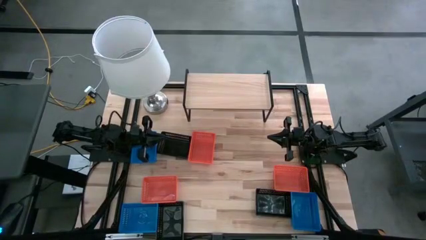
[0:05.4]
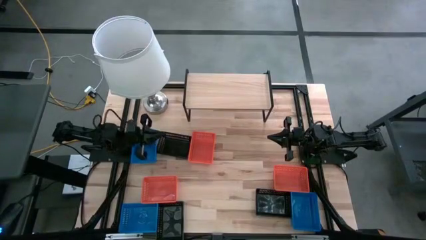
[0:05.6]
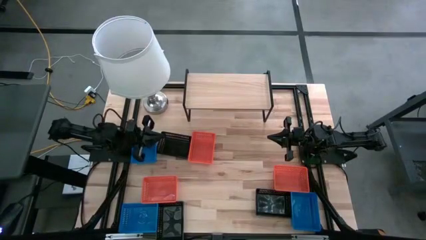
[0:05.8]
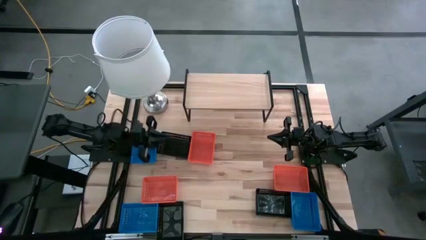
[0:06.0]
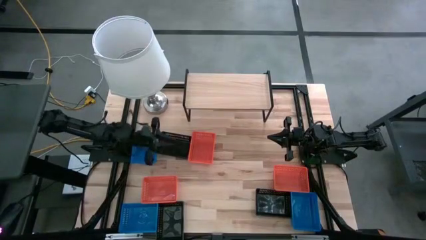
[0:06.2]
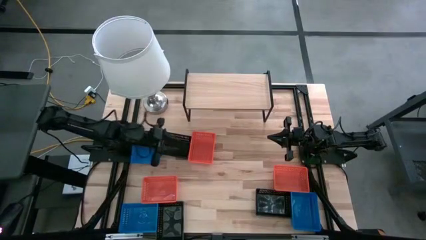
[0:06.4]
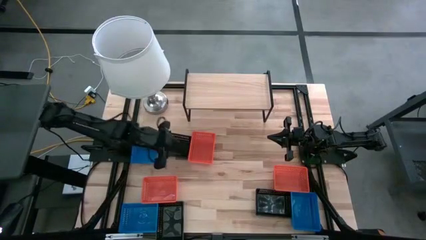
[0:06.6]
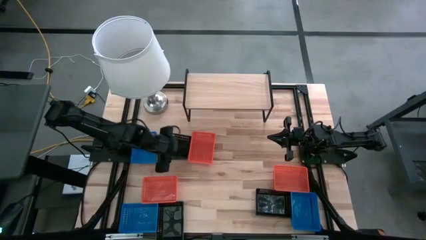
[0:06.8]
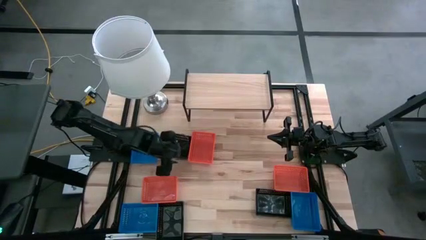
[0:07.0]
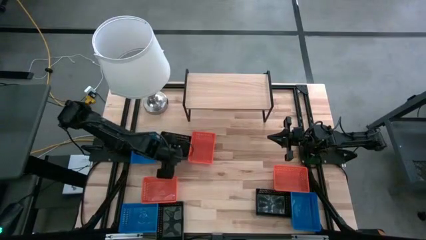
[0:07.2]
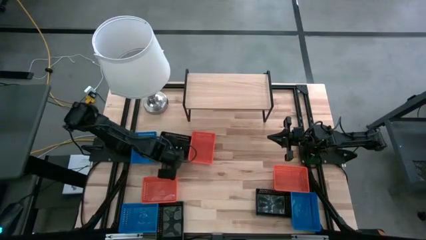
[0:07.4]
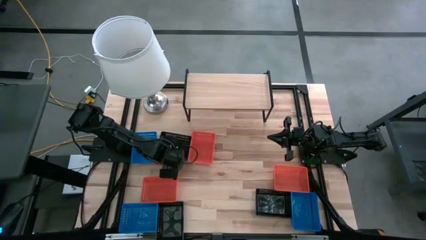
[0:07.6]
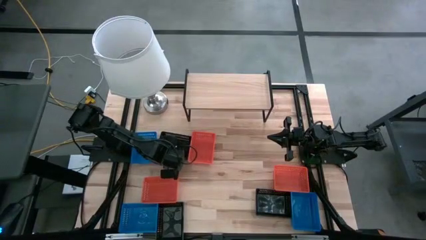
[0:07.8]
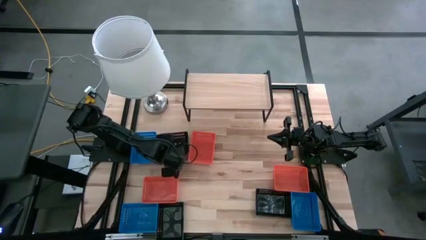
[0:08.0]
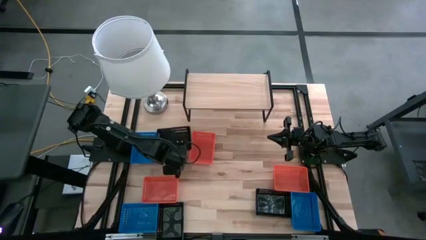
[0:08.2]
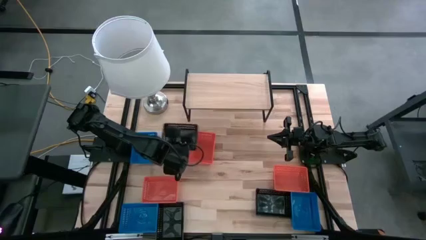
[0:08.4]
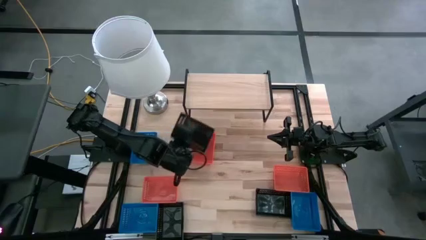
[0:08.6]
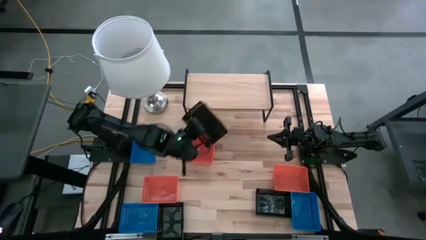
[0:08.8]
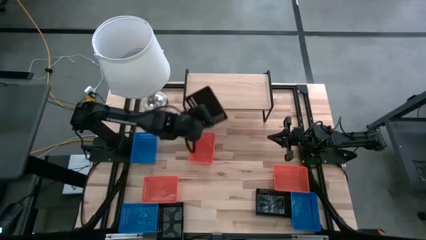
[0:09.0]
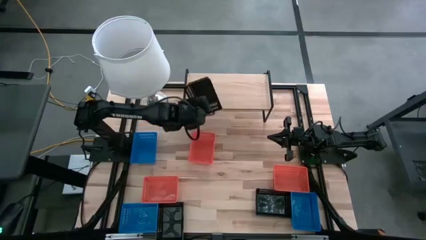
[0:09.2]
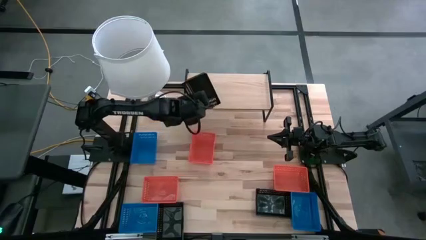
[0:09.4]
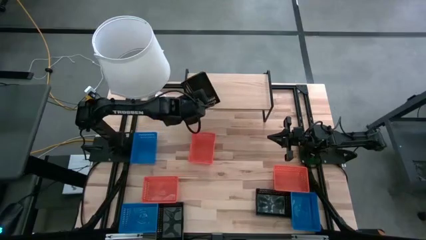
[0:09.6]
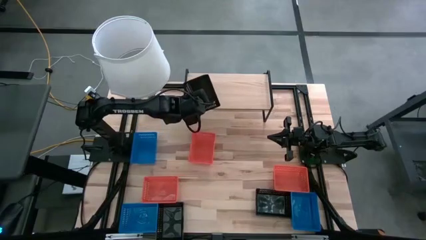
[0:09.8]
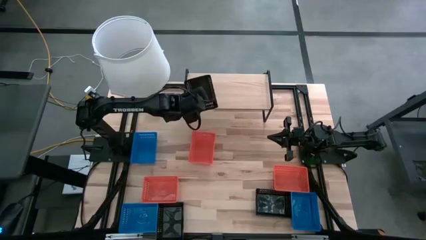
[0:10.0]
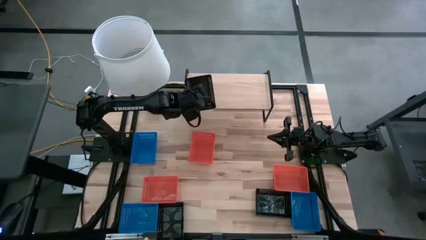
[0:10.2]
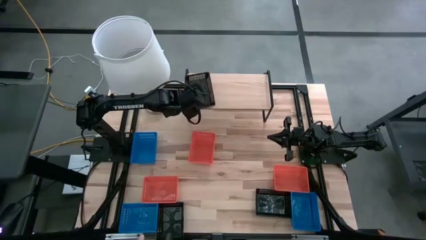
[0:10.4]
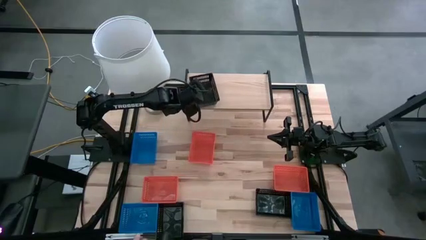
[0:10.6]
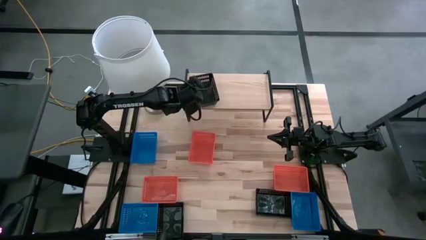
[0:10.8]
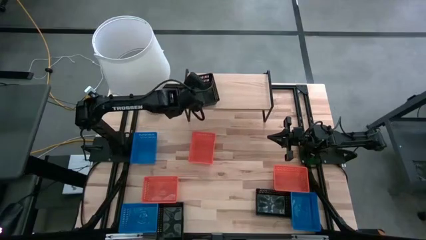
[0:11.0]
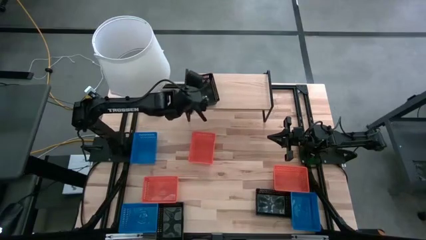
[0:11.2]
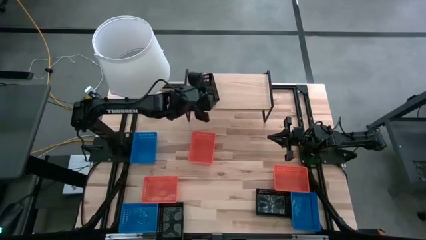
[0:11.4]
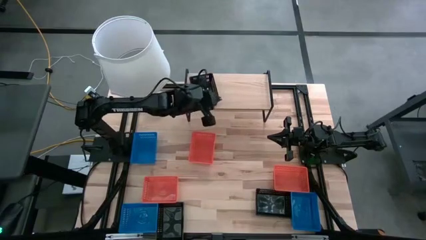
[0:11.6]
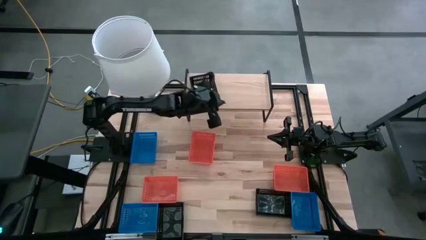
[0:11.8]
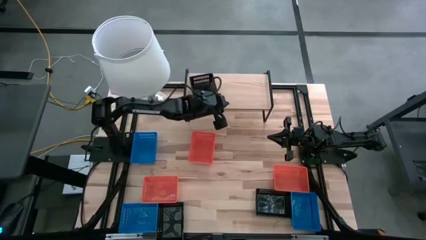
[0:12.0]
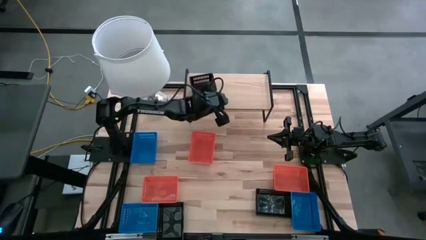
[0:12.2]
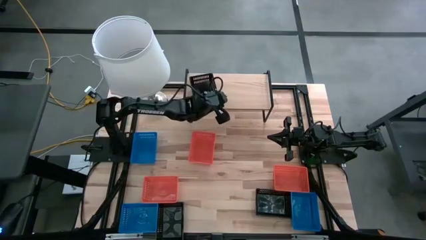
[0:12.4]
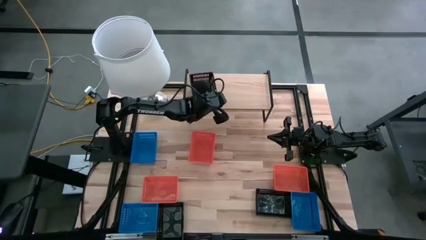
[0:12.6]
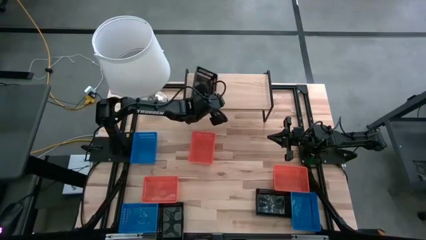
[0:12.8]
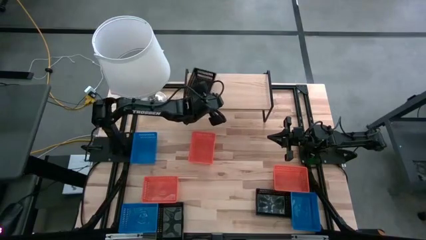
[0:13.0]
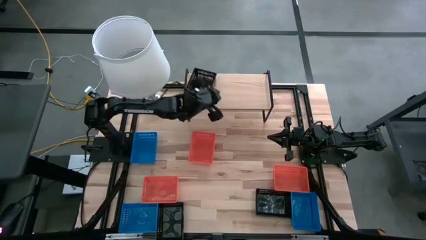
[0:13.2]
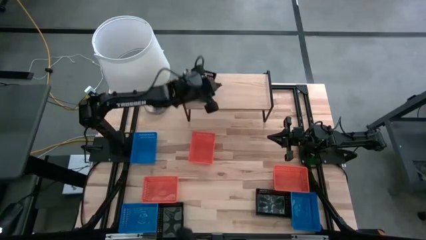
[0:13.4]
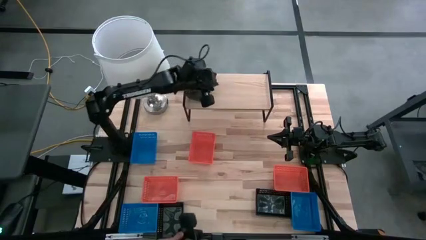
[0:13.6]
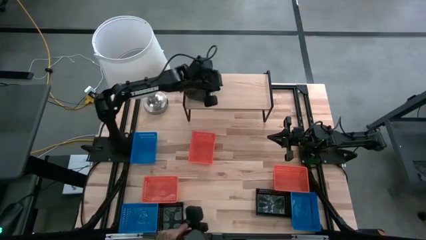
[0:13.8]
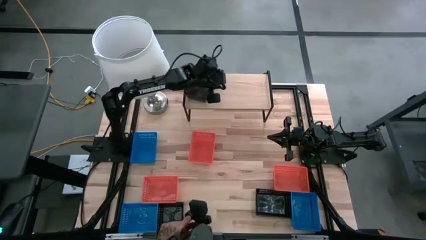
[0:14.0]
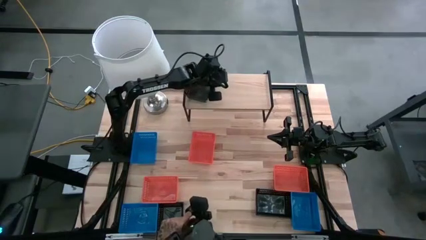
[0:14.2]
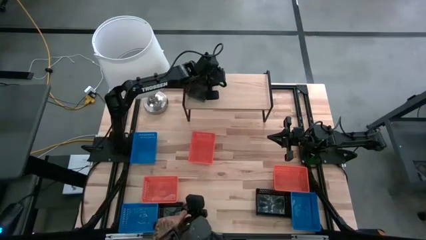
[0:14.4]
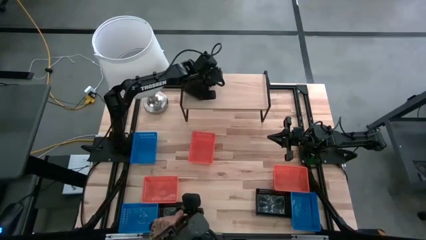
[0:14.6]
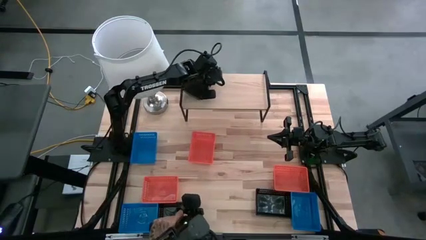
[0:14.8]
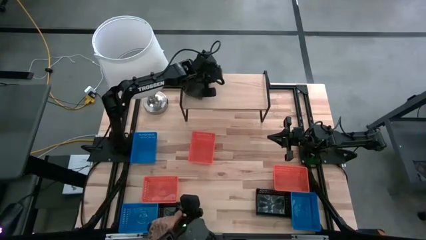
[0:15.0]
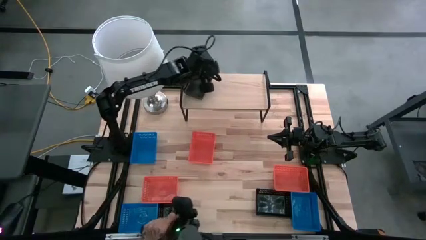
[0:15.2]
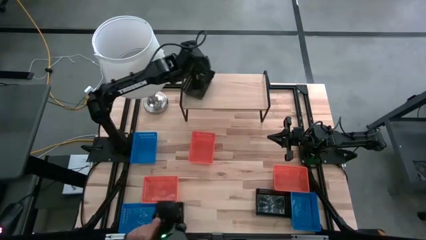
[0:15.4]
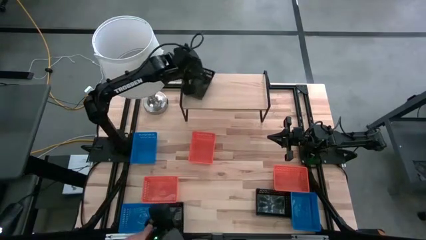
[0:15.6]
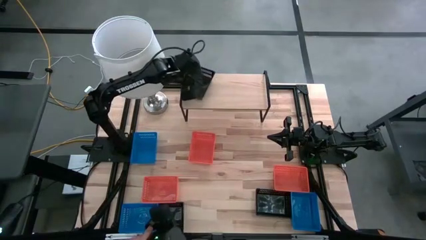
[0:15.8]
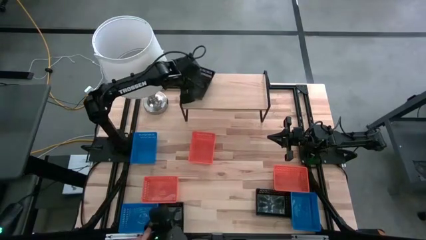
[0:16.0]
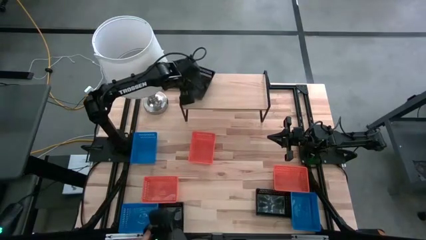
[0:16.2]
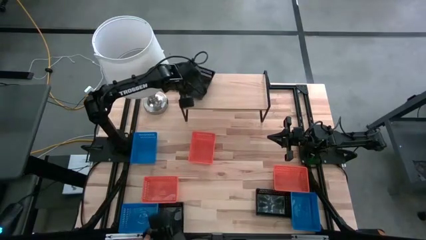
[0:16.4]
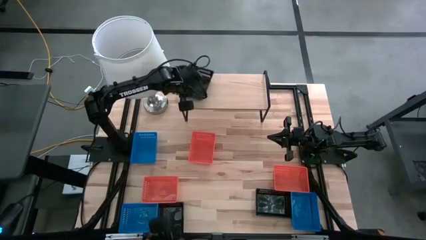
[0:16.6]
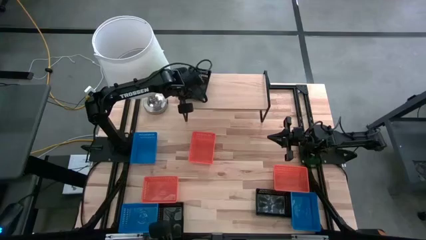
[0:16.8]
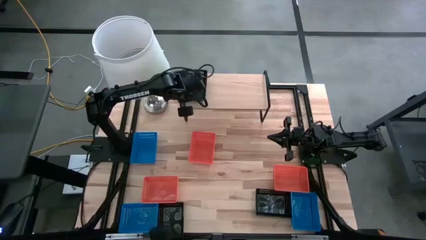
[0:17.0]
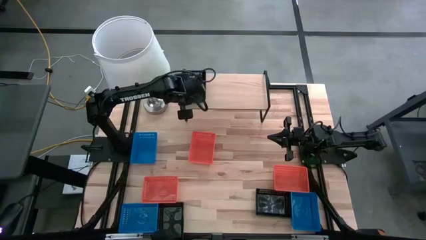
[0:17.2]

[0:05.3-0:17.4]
Task: Stack baskets on shelf by color
Put the top black bin on the shelf

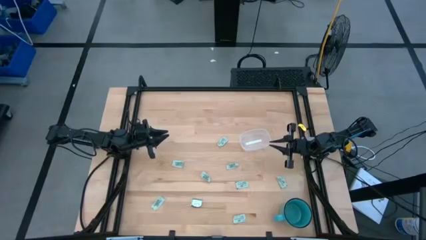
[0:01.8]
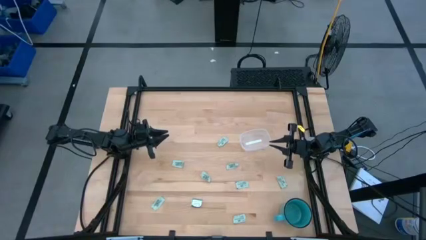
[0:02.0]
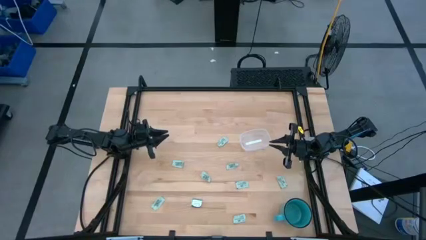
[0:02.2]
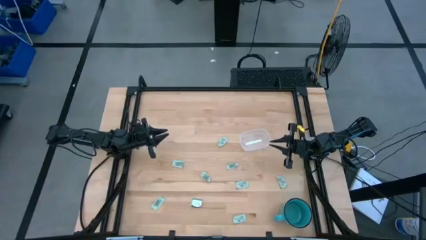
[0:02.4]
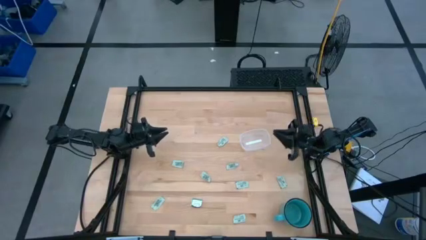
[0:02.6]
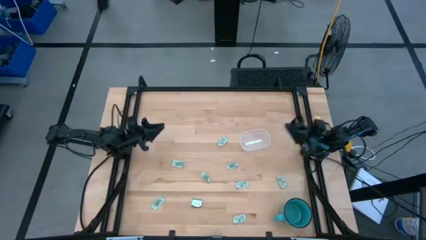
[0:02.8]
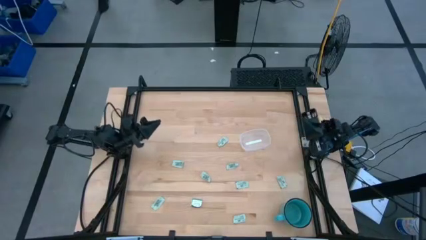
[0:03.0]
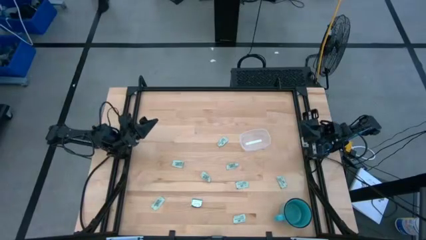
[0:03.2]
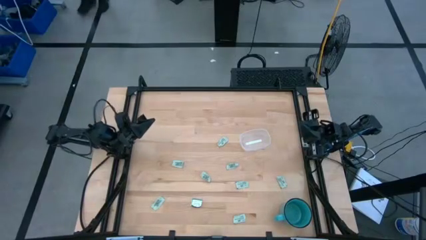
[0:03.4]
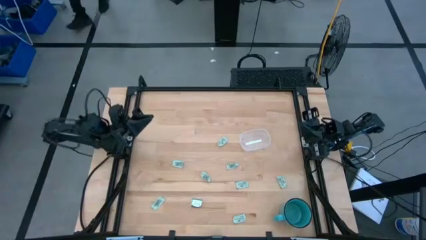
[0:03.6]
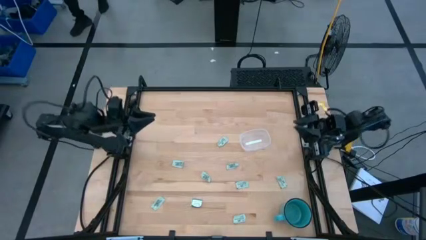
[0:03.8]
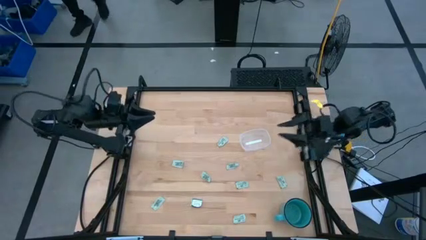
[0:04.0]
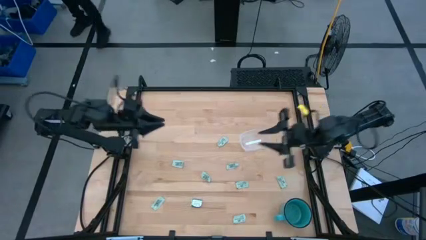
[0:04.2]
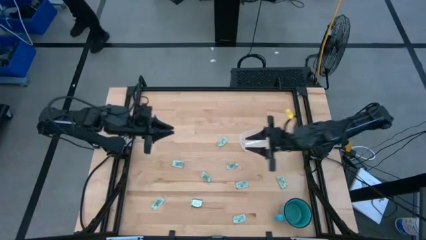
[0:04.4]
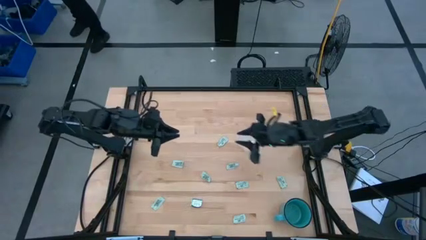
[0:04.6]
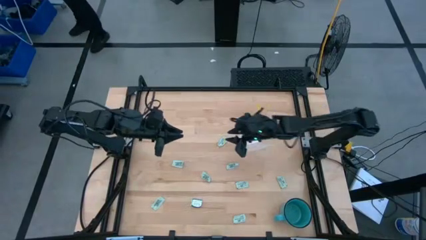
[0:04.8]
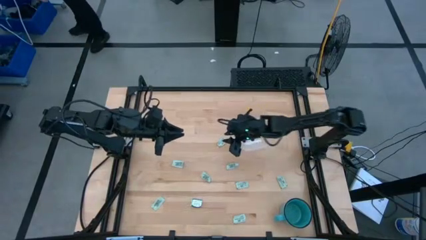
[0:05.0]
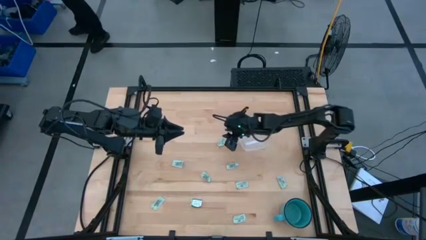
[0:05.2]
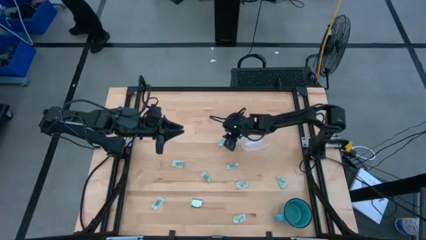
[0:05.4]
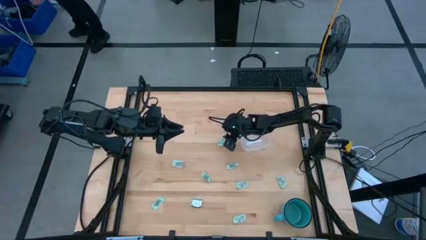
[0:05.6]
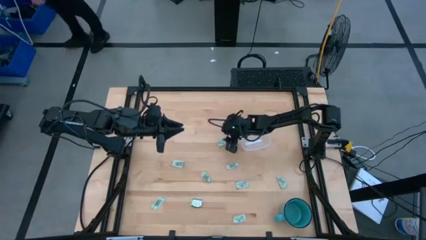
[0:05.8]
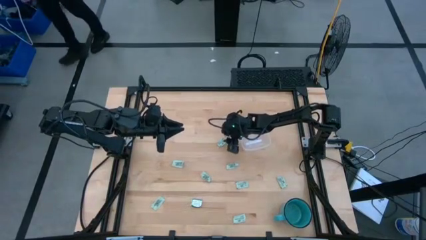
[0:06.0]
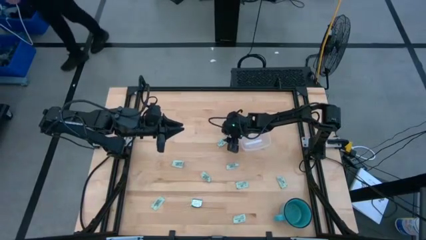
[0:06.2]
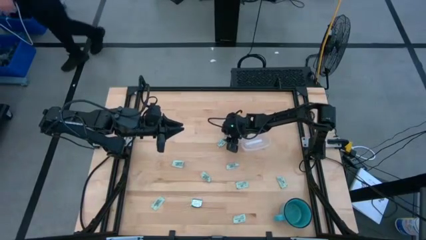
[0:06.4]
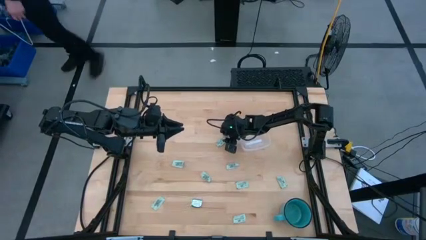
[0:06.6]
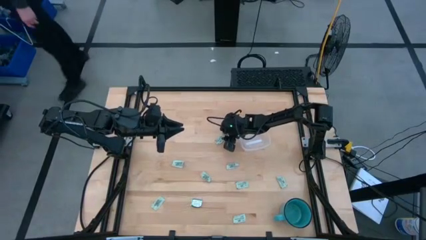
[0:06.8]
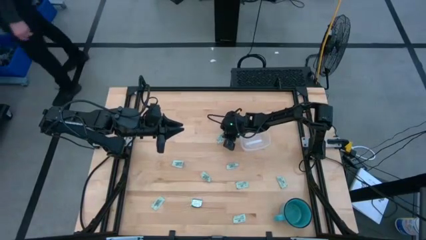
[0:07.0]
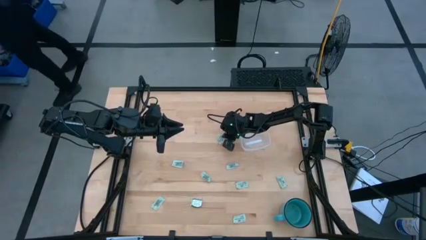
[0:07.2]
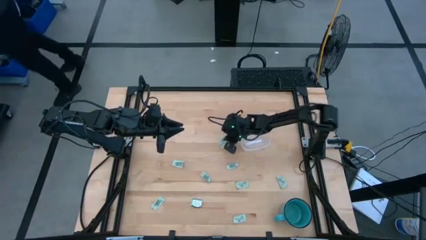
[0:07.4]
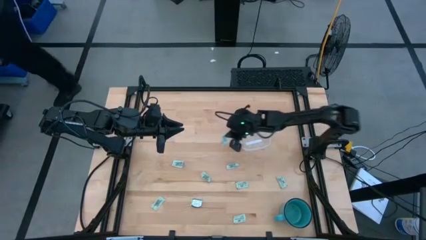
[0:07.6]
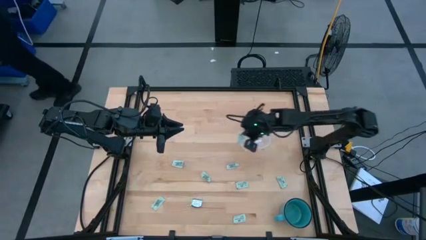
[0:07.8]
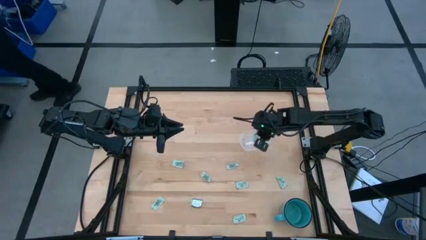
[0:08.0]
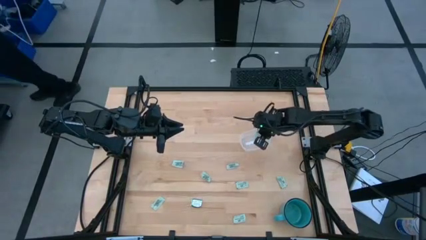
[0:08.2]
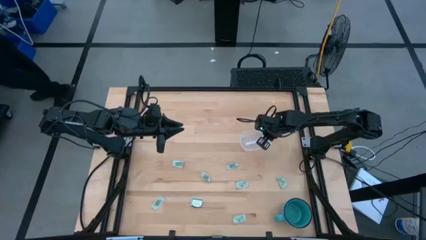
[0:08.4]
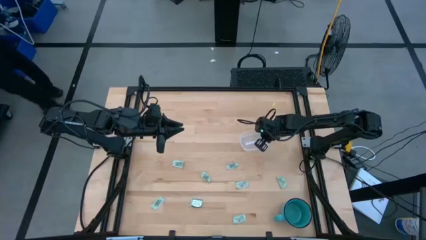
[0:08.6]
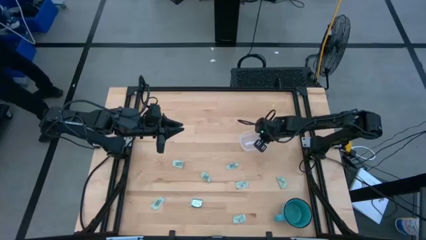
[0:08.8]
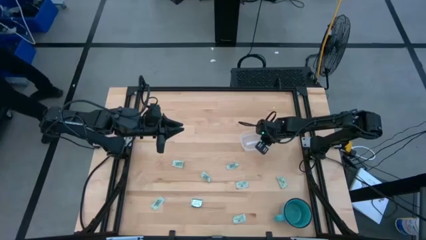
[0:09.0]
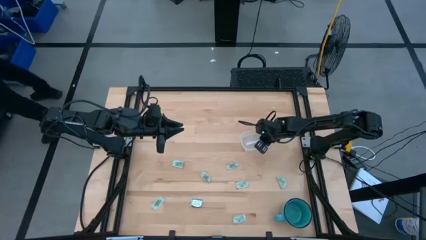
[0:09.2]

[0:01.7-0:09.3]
Task: Pick and place Stevia / Truvia into bins
Put the green stevia packet into the transparent bin
